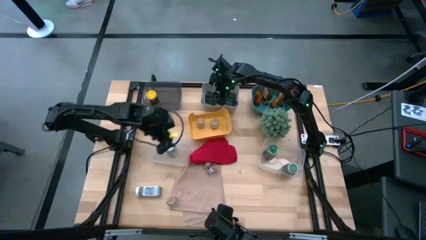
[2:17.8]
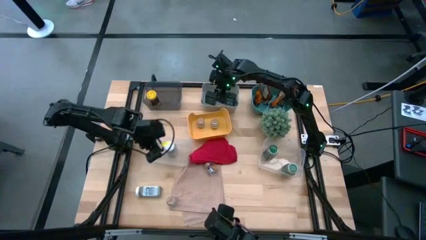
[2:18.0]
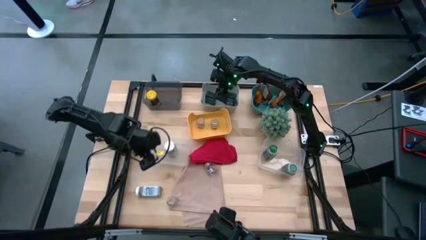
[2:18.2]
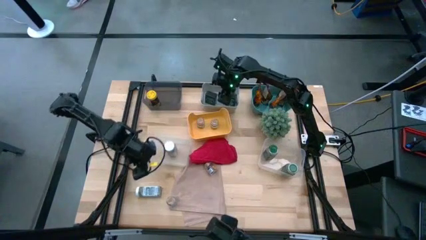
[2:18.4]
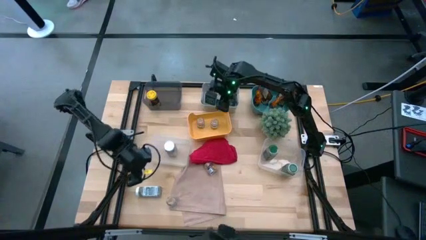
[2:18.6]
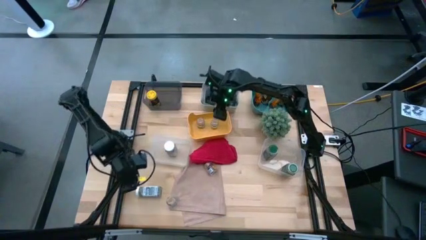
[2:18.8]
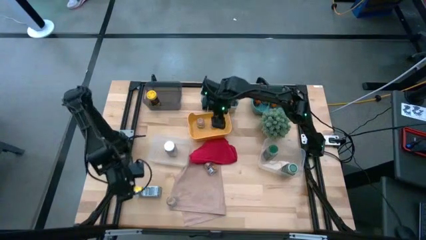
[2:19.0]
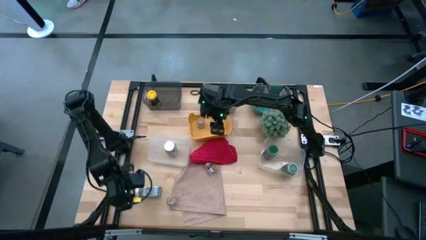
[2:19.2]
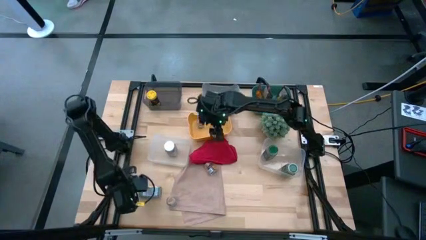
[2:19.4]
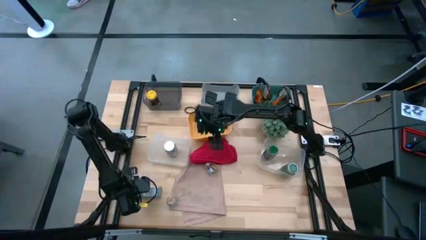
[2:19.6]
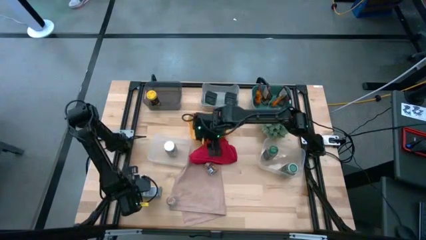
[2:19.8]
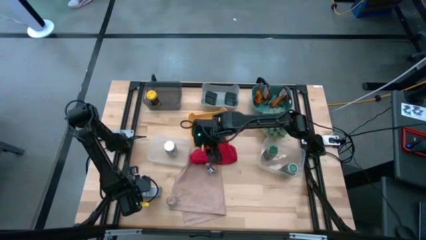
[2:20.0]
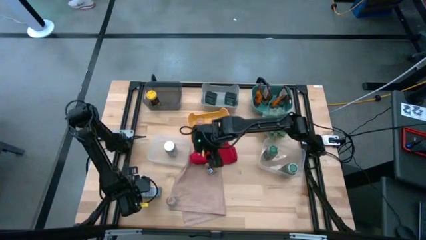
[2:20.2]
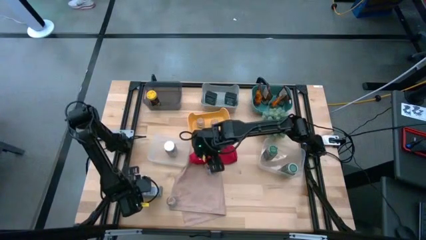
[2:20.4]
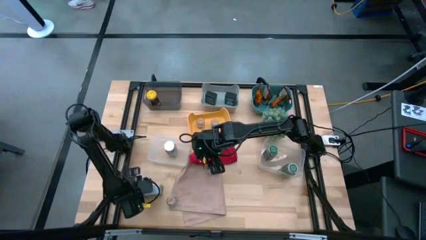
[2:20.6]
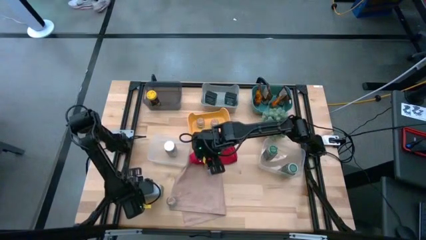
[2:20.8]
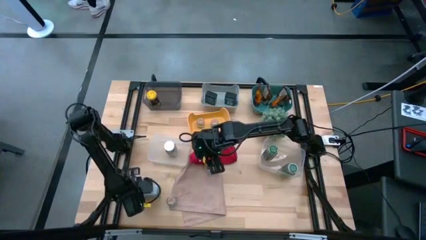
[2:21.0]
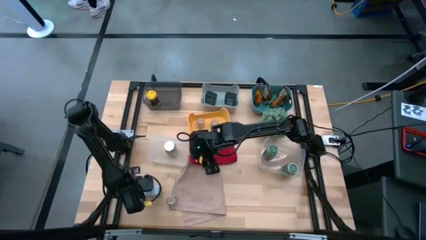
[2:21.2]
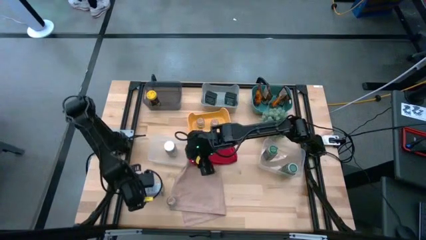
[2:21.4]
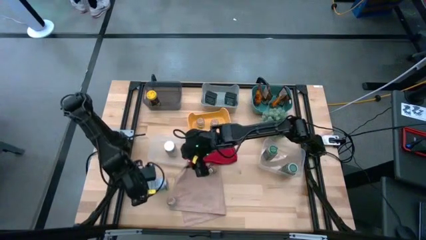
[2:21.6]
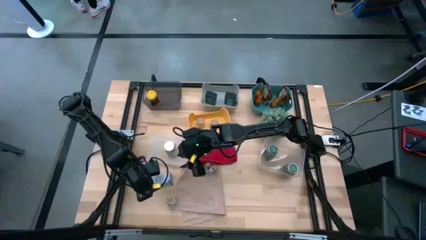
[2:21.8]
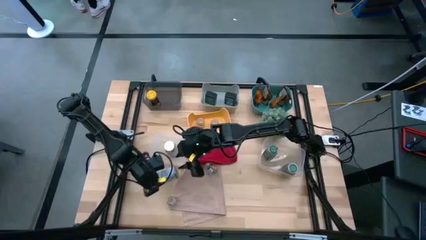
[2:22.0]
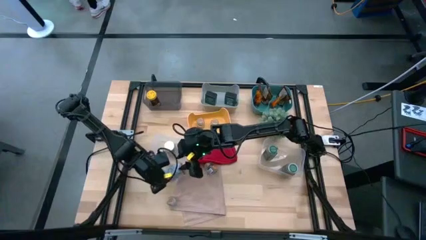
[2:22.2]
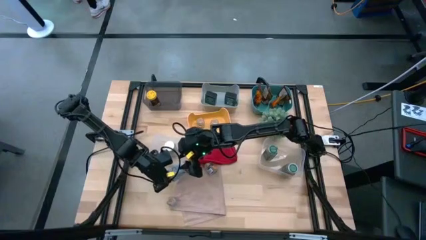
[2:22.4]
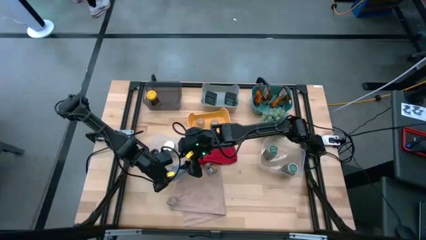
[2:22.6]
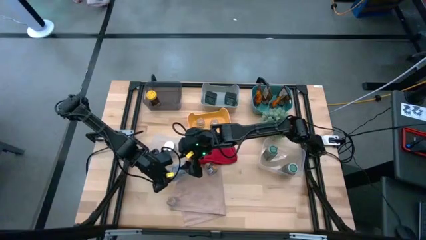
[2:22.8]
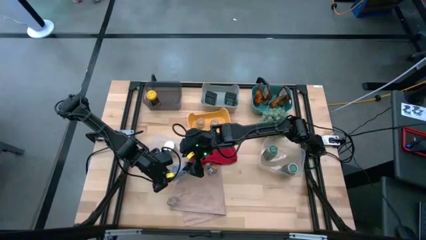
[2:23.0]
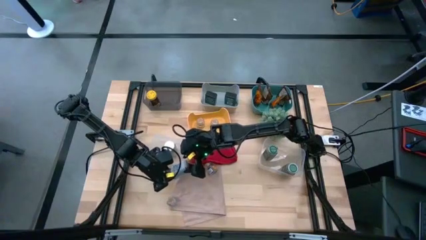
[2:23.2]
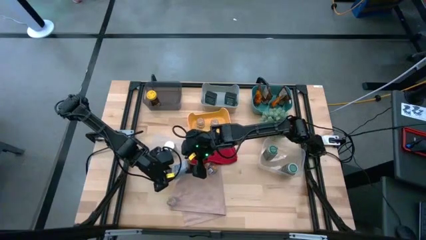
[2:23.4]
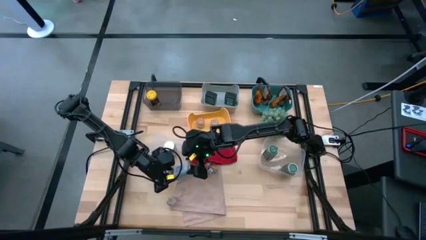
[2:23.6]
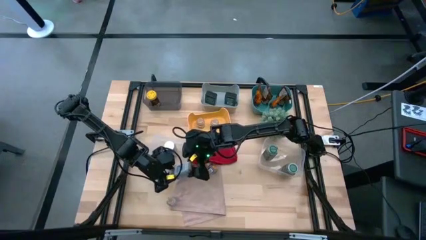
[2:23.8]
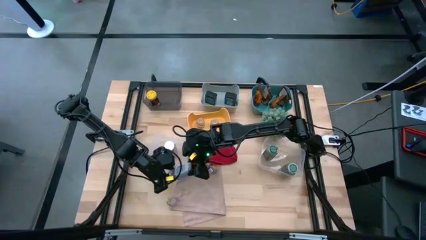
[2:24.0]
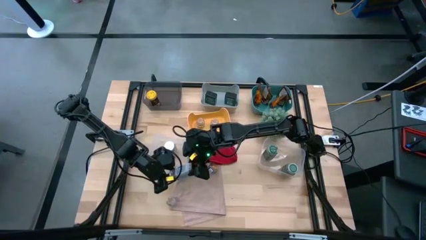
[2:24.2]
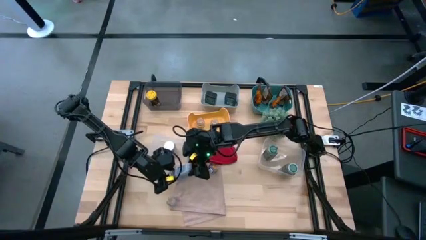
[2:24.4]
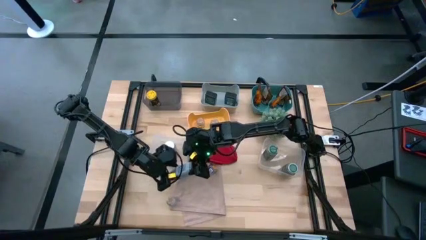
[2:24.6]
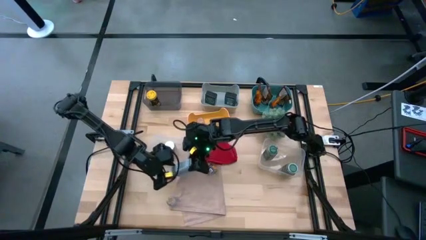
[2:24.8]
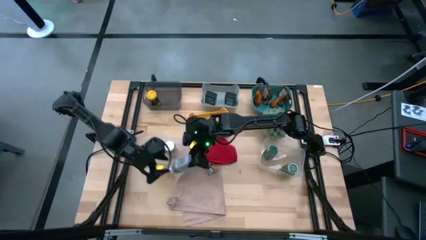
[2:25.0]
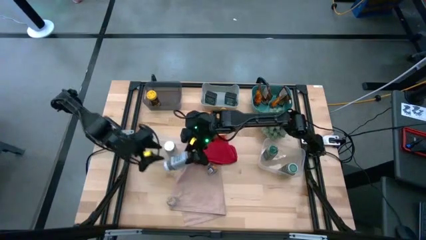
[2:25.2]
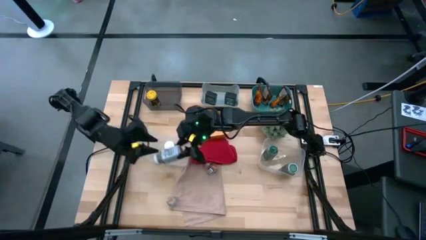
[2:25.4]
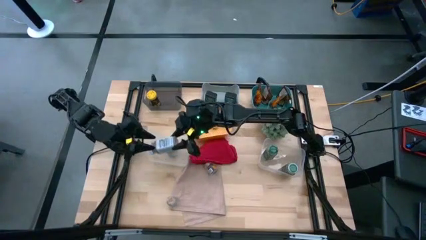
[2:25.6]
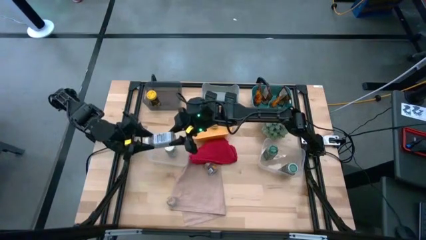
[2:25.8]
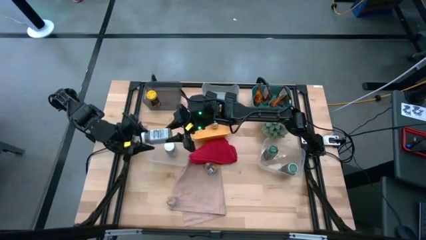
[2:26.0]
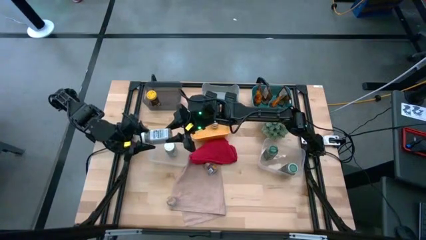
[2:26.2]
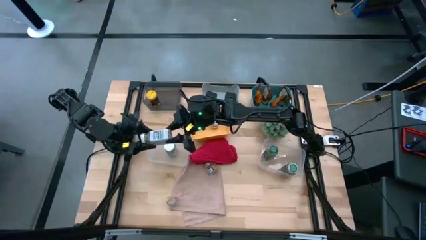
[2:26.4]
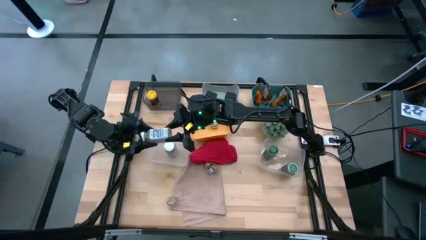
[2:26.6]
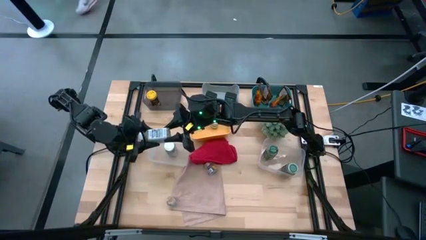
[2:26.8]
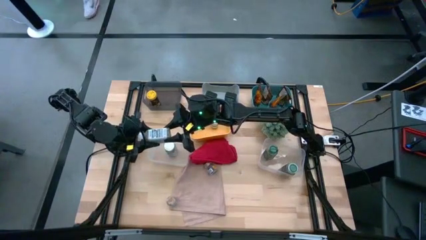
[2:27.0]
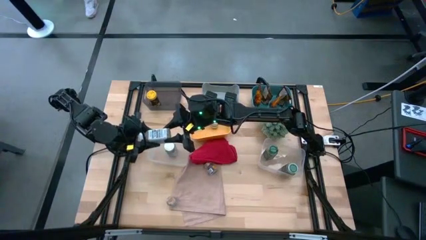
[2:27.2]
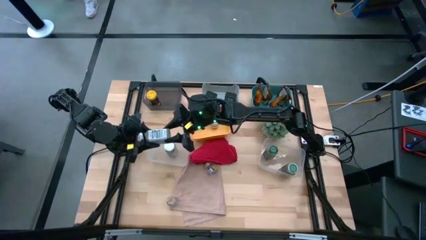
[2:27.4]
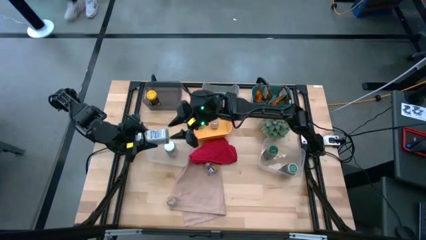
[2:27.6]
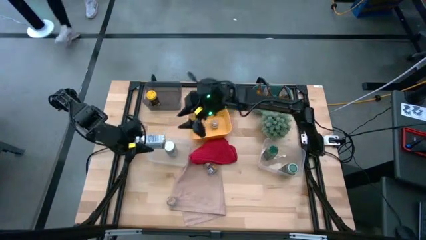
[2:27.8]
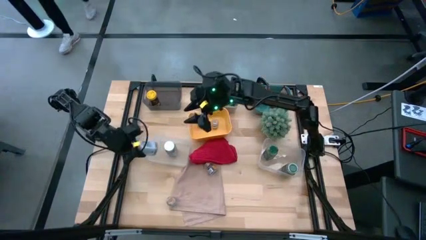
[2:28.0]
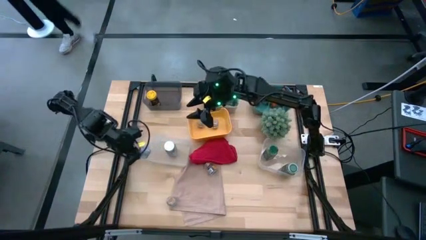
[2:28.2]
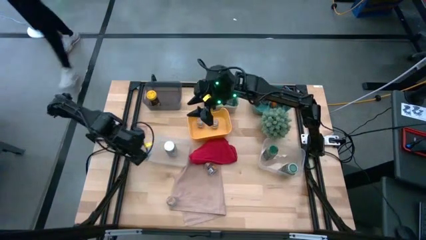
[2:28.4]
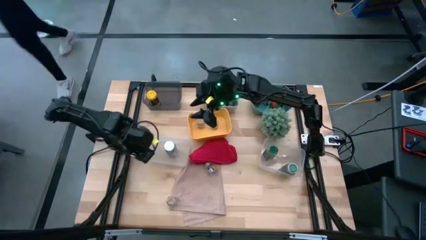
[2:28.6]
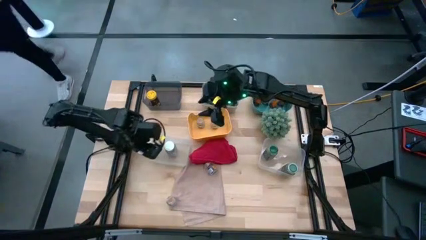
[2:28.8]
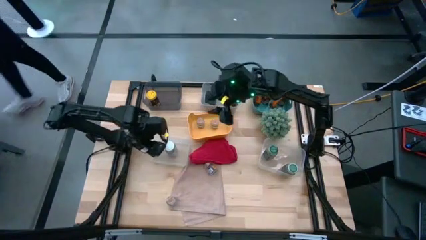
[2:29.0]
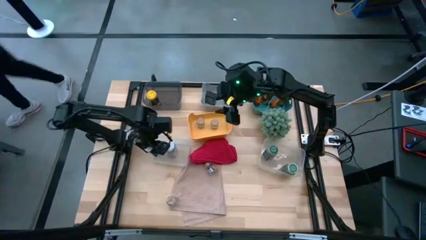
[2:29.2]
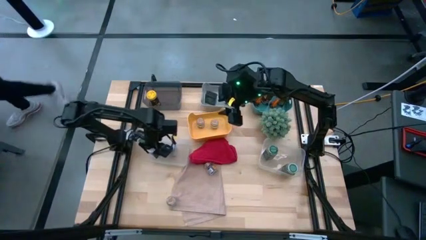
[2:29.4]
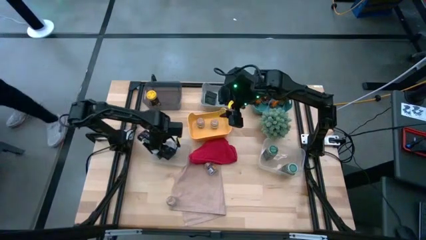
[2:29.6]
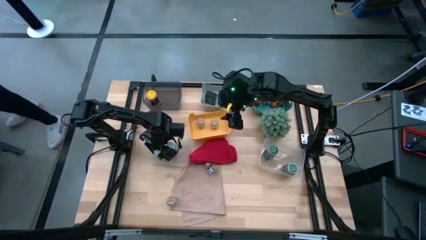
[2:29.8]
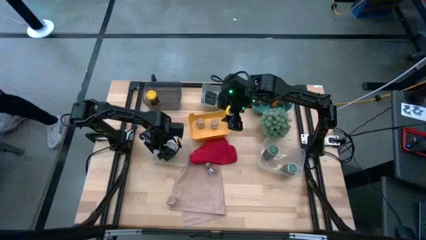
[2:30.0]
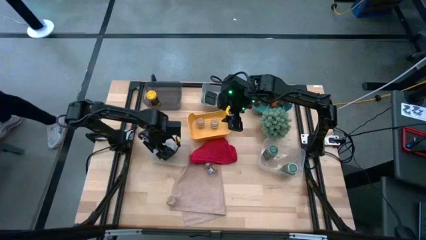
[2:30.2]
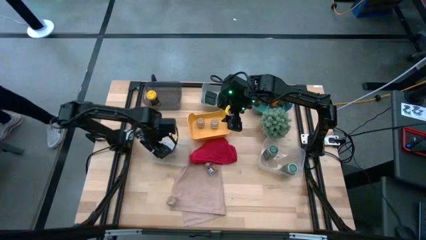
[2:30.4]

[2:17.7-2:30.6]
Task: Sort spices by type
Put the white seasoning bottle into the left transparent bin
